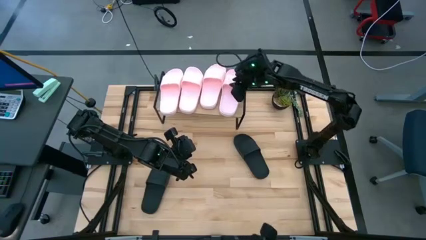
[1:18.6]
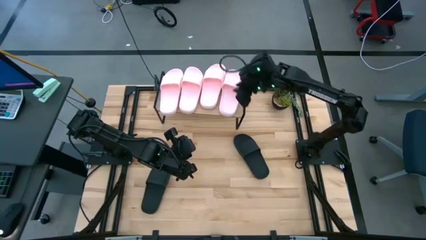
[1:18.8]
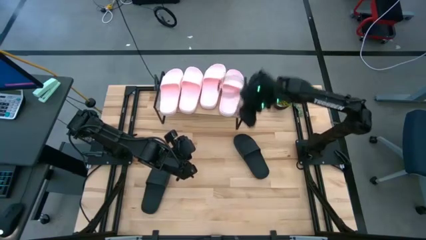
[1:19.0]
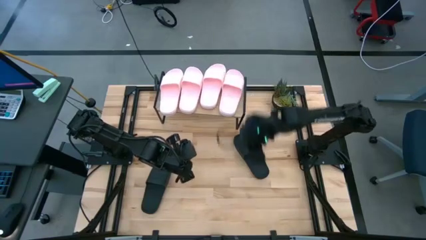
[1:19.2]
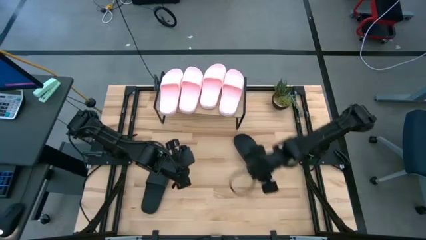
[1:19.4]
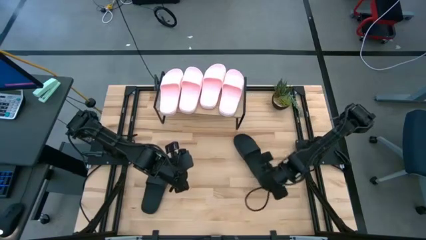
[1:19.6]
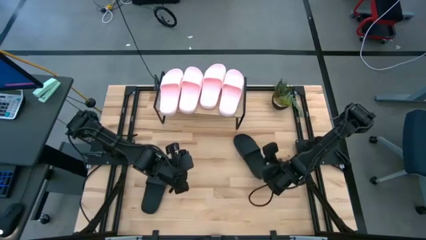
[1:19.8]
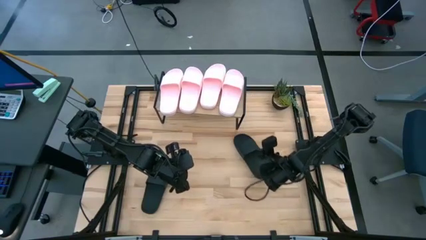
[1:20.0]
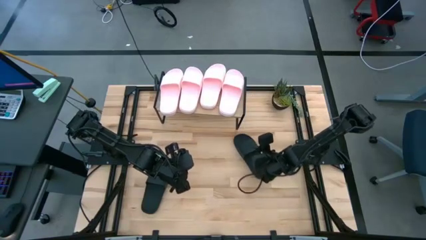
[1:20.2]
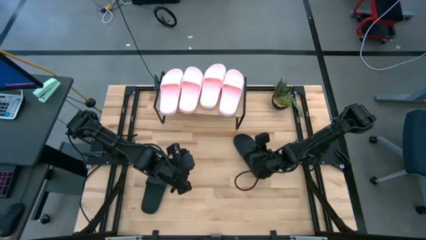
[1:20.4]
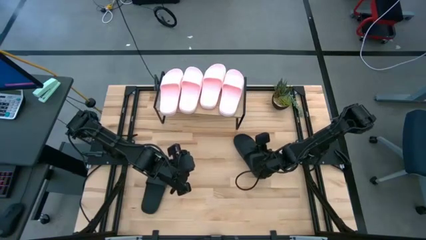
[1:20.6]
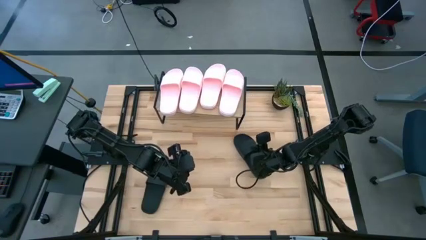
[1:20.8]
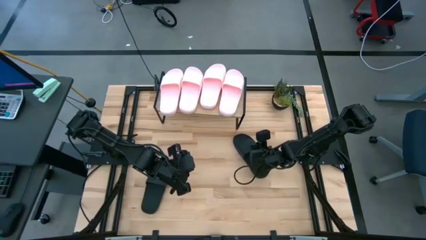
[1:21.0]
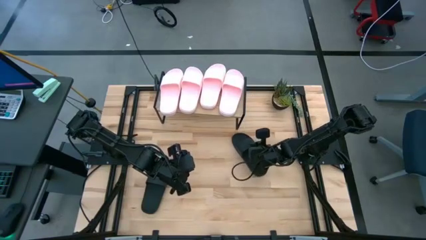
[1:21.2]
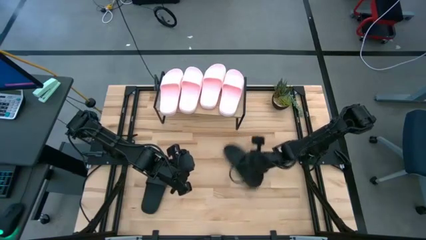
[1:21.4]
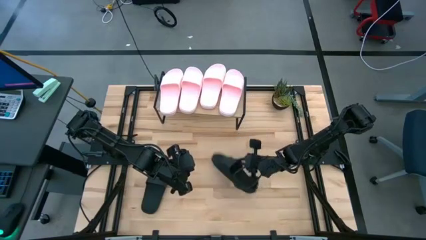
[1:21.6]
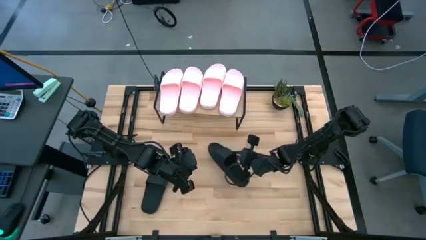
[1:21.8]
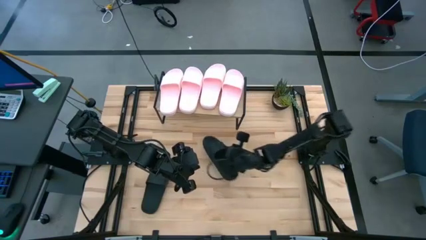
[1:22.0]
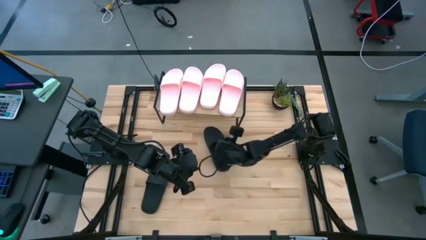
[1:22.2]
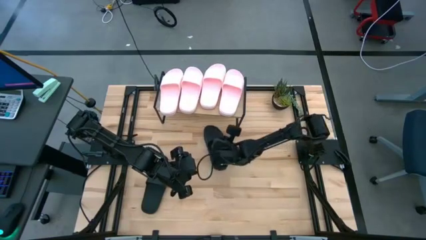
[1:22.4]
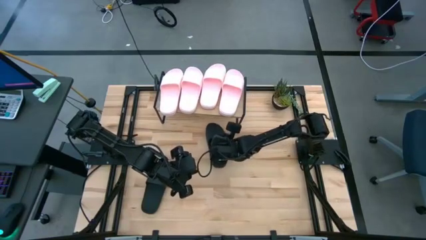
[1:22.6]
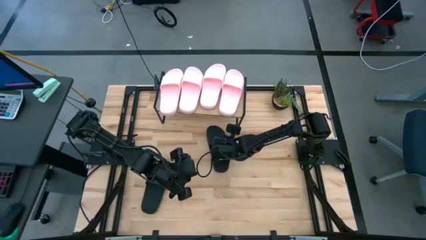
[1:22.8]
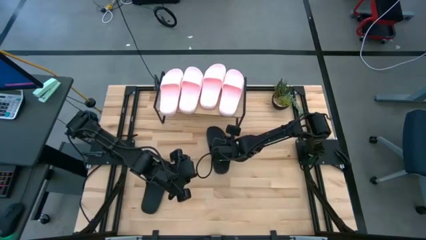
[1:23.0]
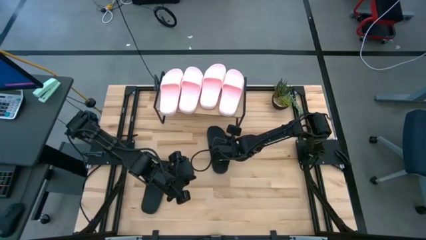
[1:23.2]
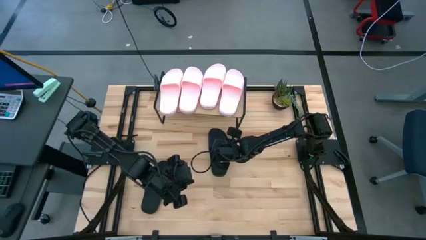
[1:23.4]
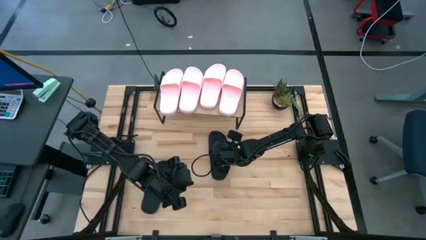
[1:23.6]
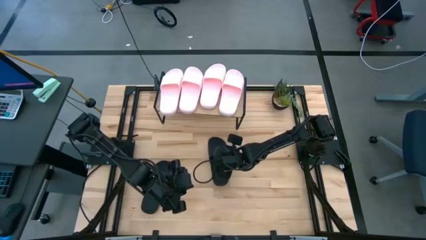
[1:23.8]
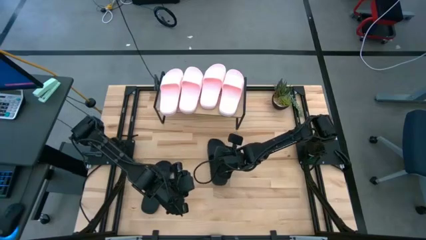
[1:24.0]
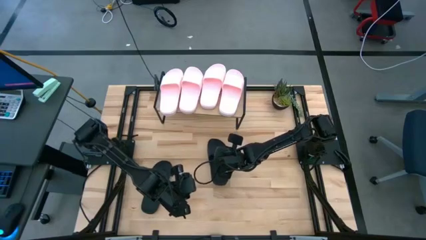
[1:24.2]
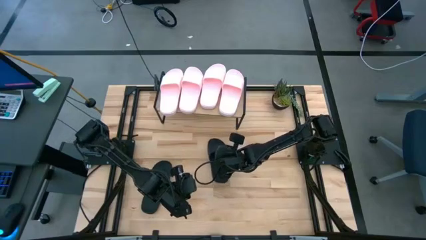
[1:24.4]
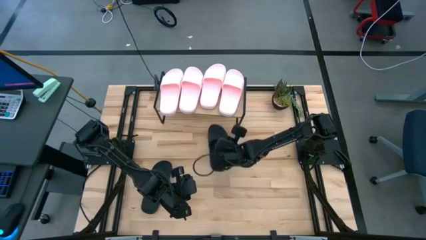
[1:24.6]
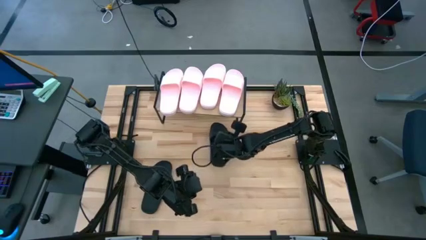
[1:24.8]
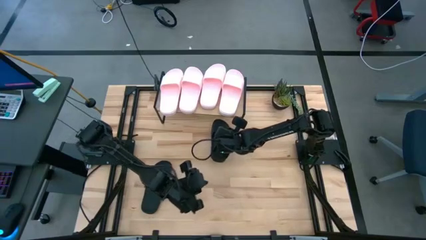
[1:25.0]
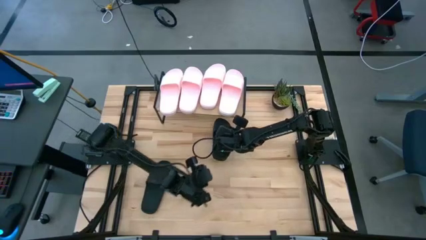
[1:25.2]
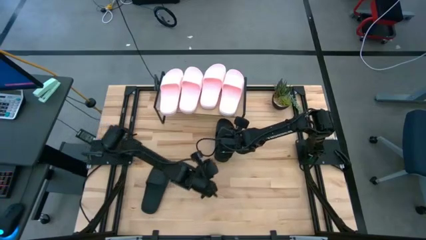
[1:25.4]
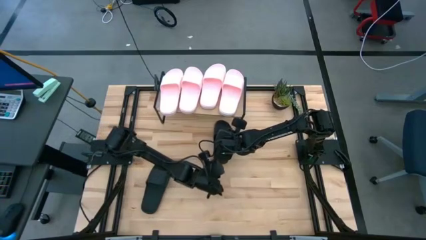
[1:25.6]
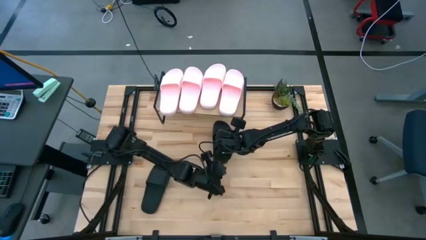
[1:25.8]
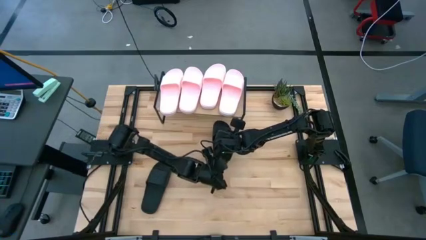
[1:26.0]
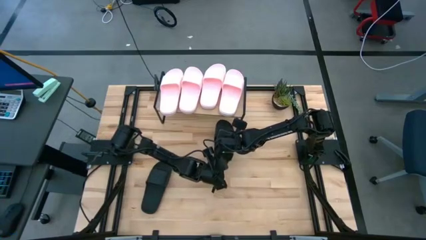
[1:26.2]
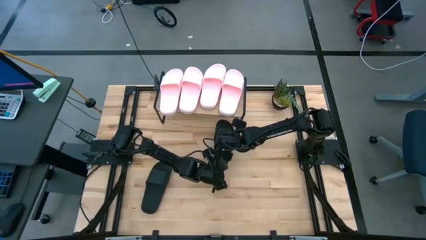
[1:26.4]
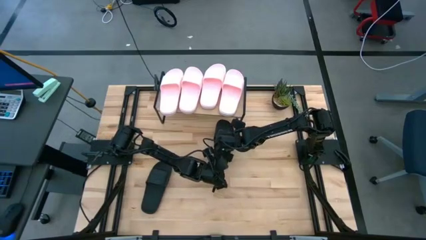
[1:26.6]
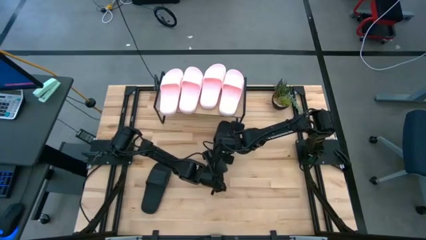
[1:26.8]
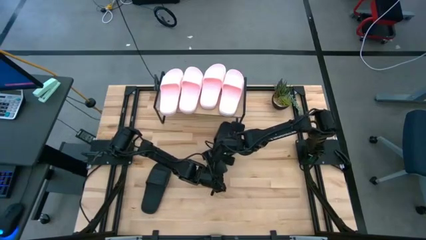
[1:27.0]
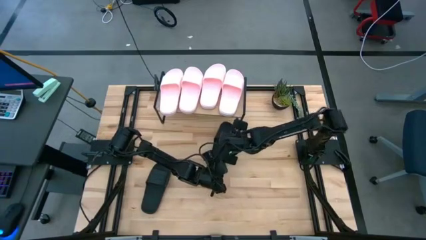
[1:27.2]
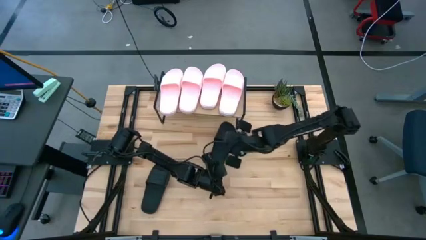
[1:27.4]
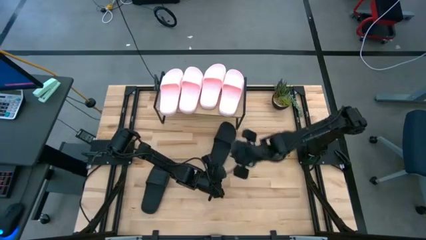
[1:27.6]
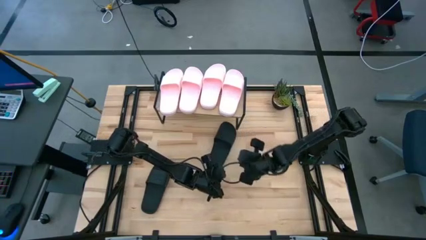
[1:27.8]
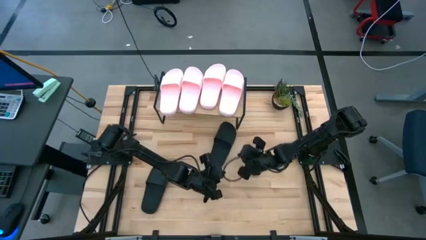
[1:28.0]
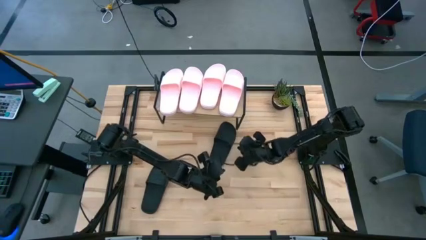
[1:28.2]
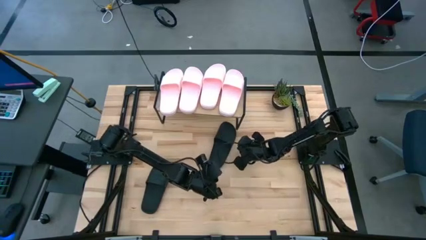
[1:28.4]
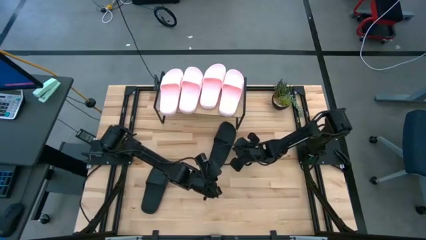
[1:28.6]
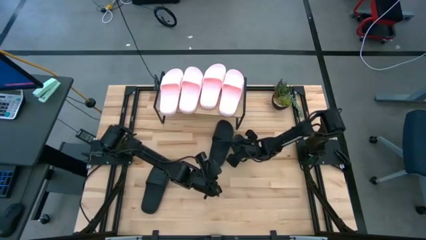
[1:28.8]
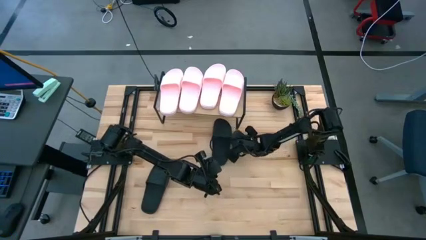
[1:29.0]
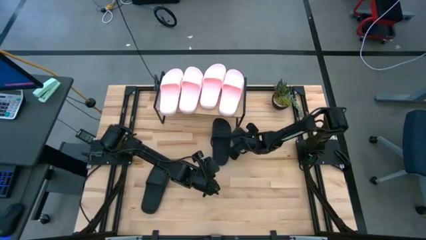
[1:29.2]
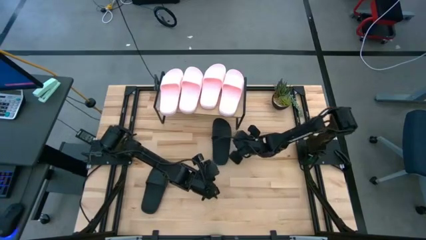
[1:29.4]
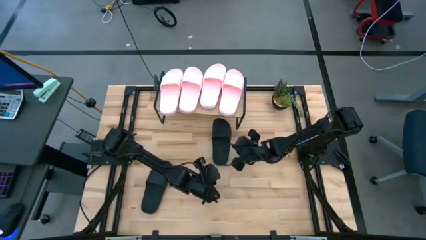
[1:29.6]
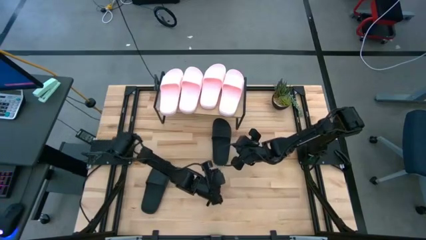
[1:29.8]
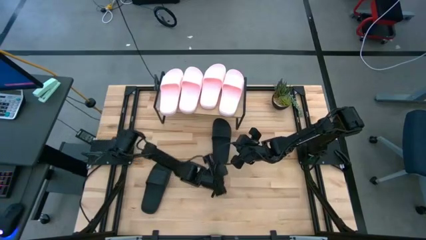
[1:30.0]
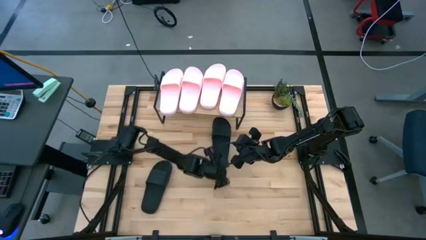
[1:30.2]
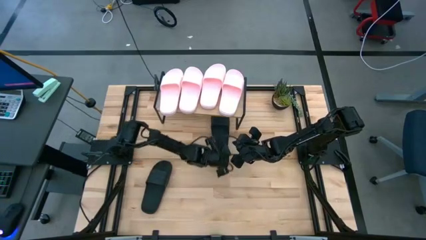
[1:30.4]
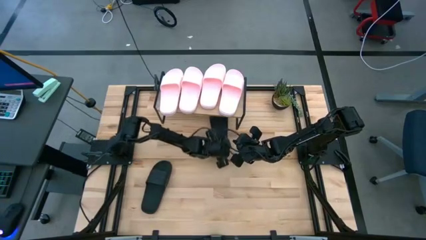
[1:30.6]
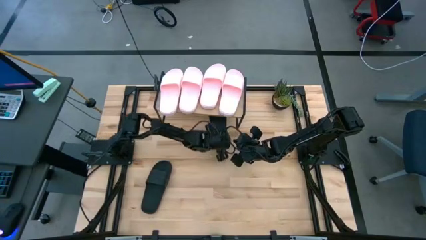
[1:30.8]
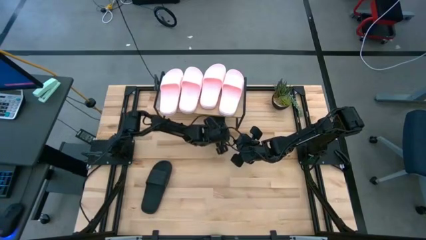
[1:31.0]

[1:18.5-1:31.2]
Task: Pick and place slides into the shelf
Put the right black slide under the shelf

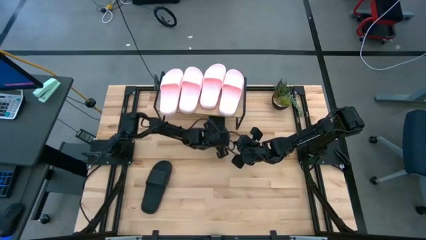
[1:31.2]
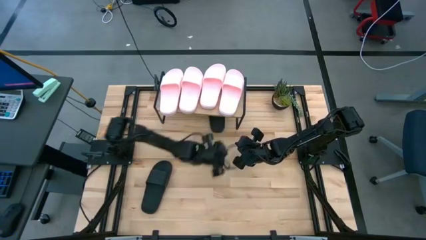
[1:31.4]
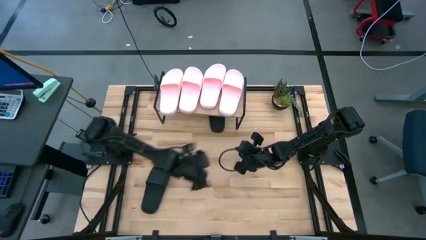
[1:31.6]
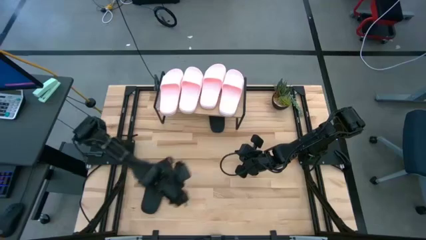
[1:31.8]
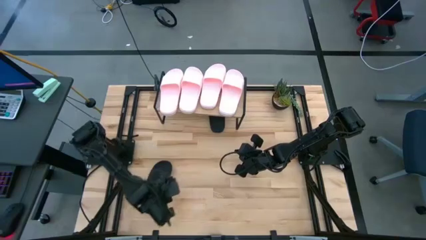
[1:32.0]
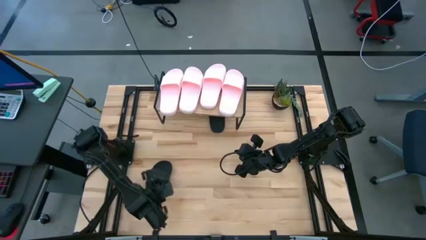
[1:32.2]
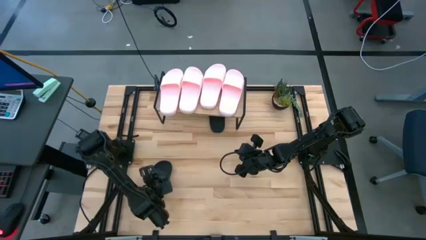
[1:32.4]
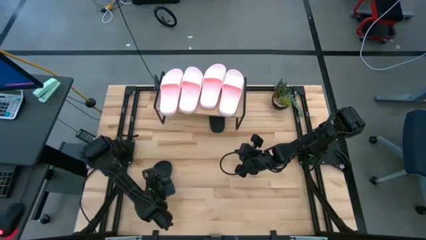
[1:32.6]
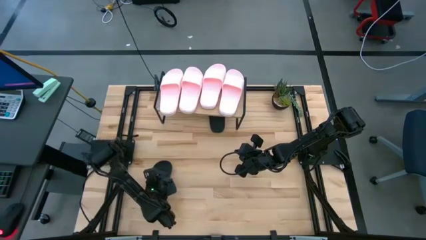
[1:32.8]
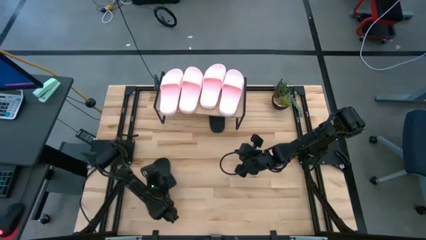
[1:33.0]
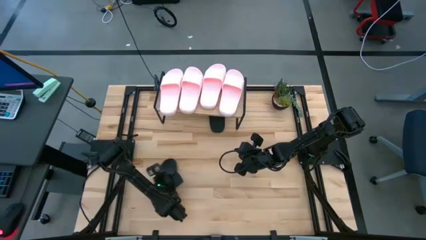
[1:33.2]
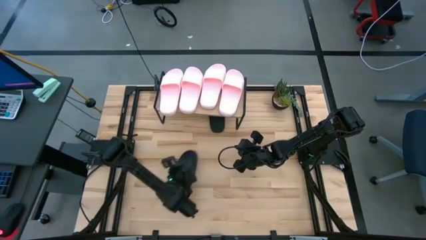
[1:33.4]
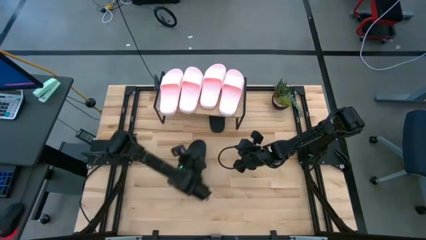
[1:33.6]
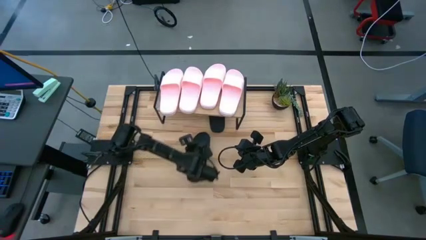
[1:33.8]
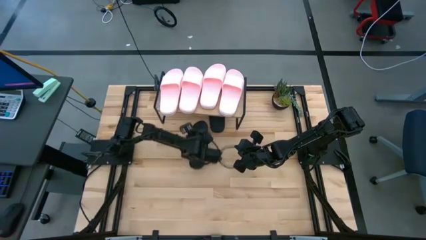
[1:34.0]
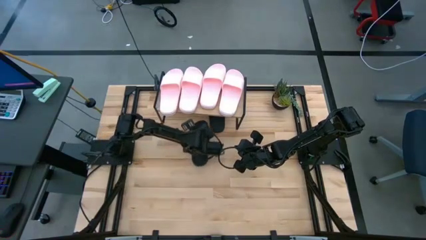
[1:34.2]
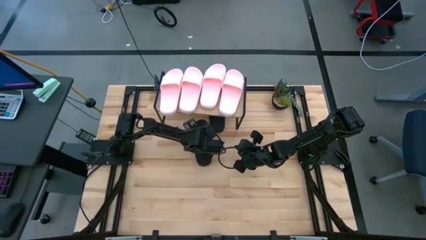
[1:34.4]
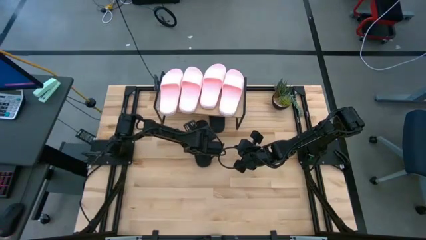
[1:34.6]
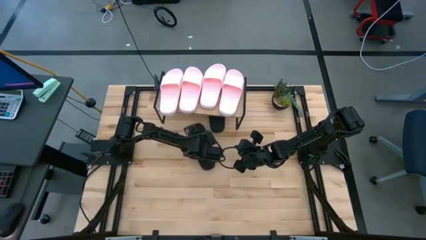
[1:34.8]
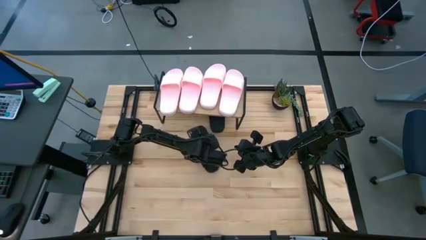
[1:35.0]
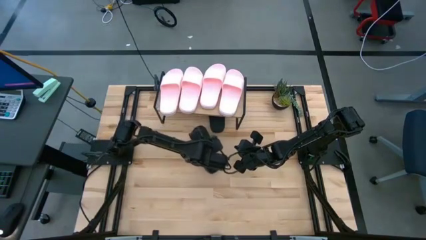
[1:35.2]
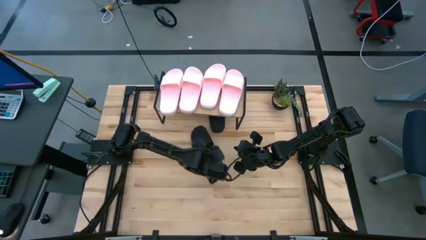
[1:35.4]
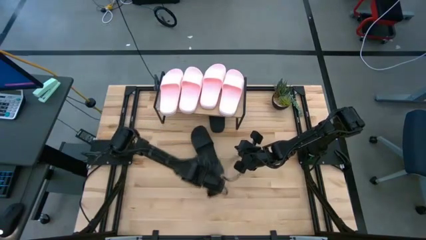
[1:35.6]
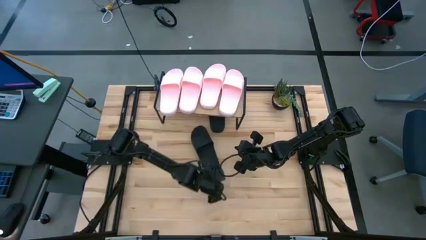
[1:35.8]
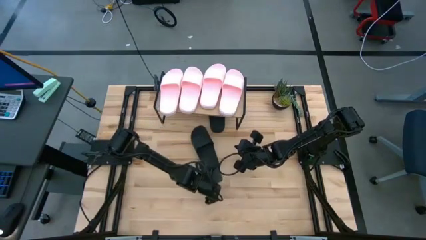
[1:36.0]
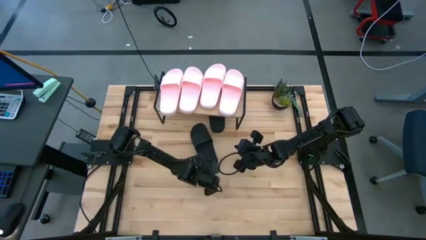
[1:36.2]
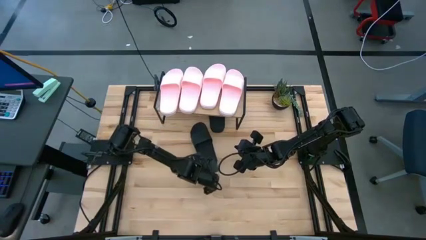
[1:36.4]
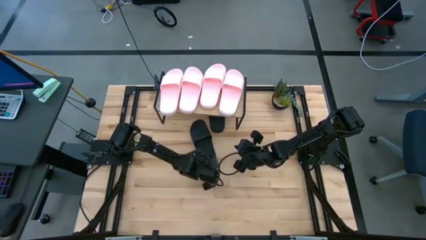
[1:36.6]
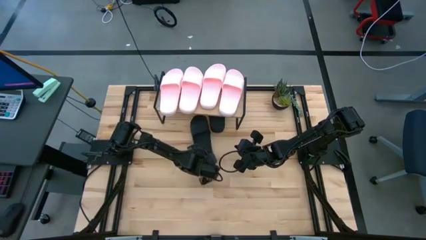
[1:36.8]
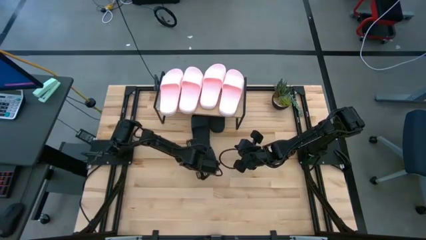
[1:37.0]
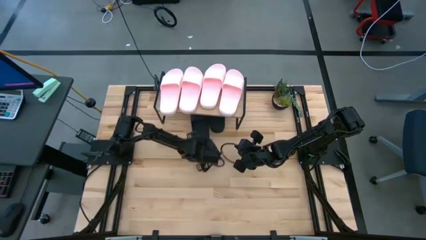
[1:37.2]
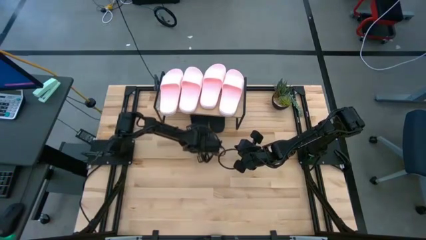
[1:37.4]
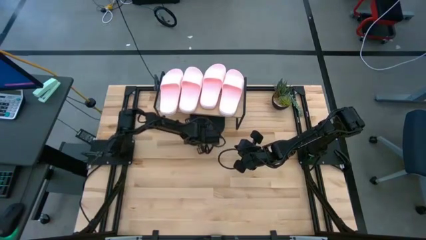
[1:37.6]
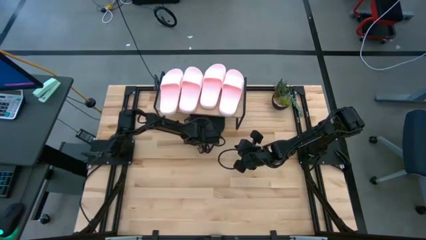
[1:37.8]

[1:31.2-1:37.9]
Put the black slide under the shelf
